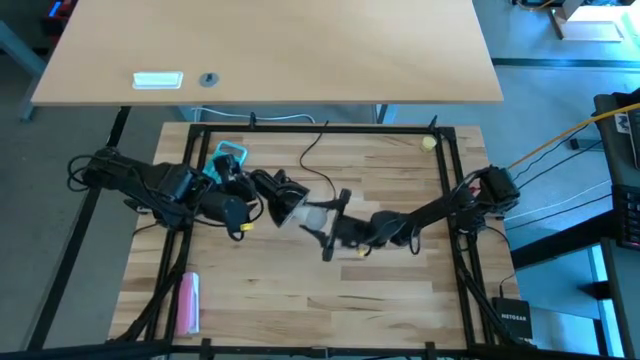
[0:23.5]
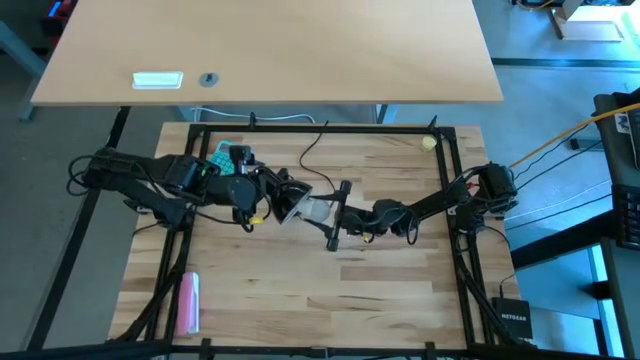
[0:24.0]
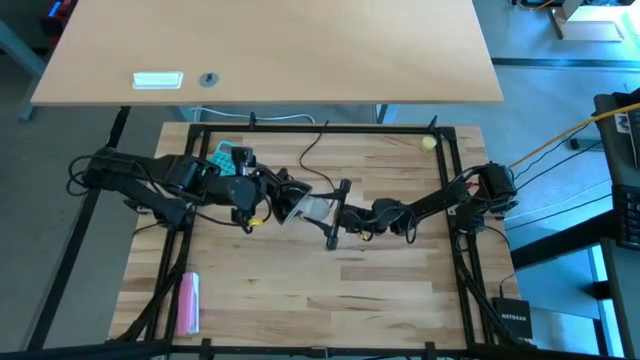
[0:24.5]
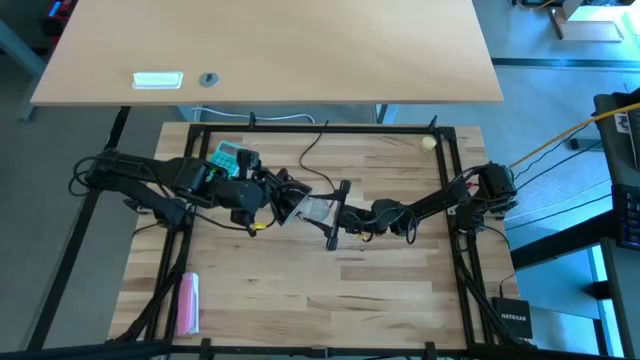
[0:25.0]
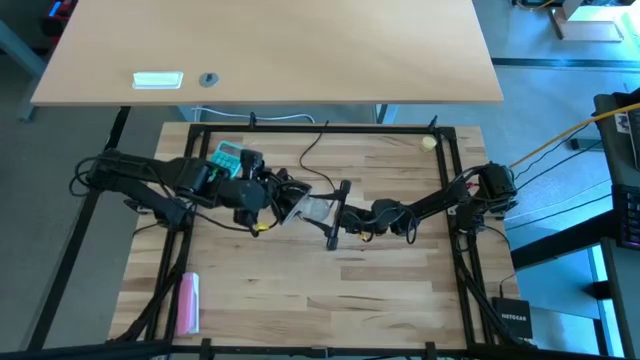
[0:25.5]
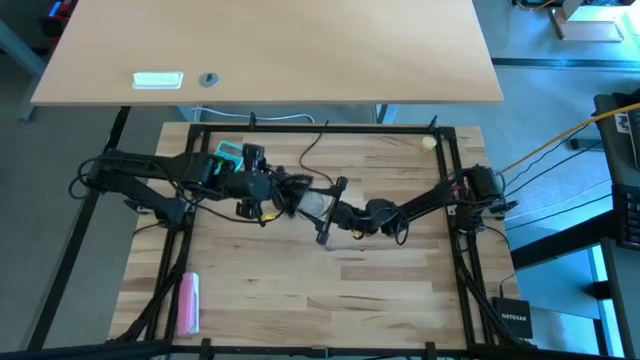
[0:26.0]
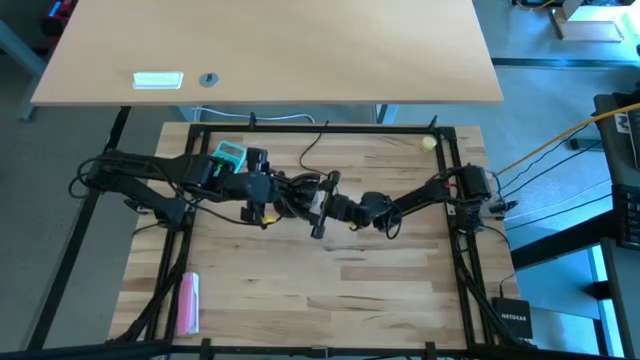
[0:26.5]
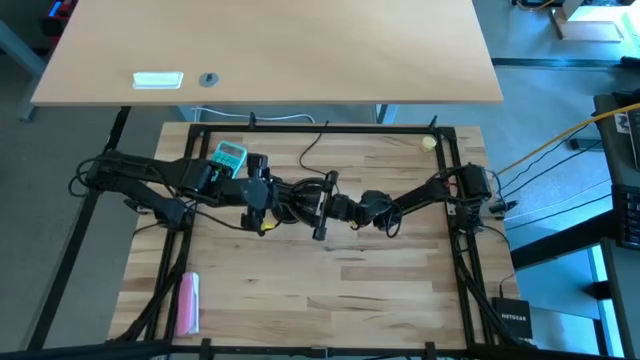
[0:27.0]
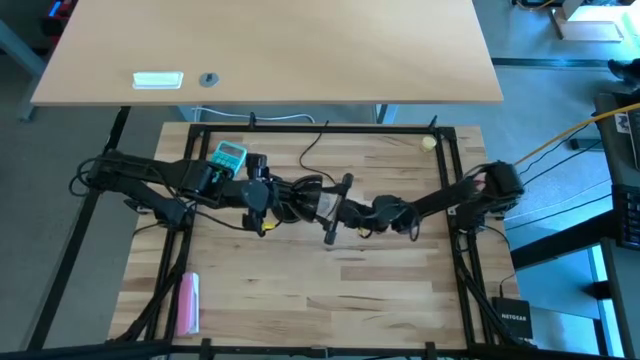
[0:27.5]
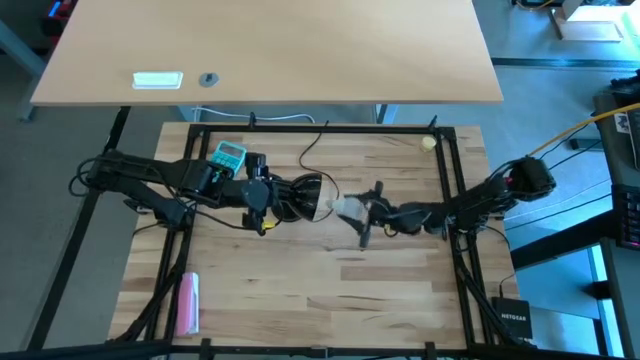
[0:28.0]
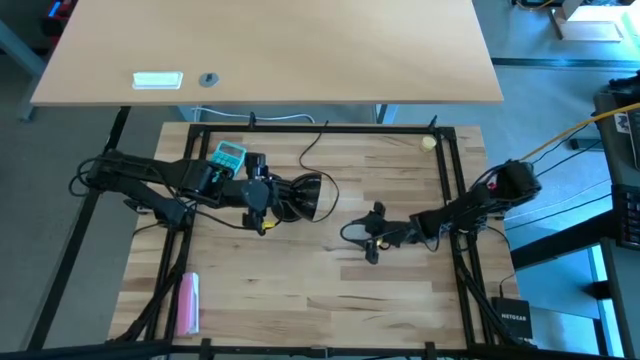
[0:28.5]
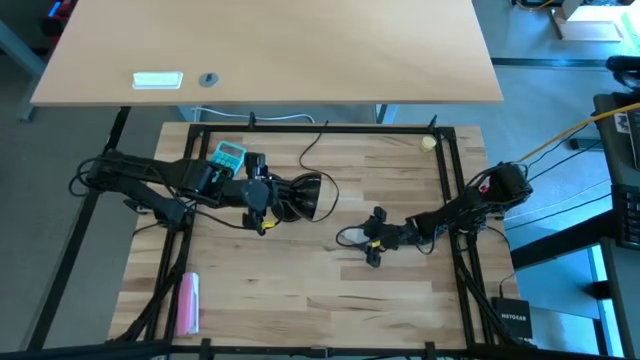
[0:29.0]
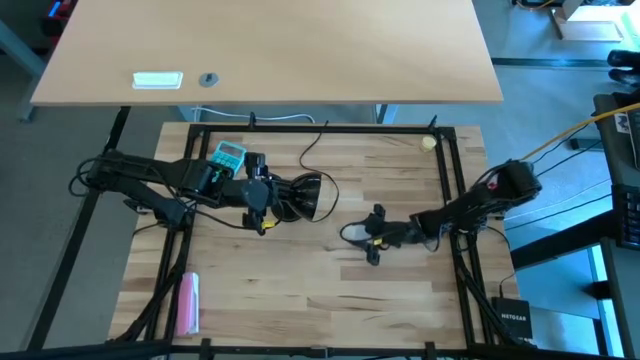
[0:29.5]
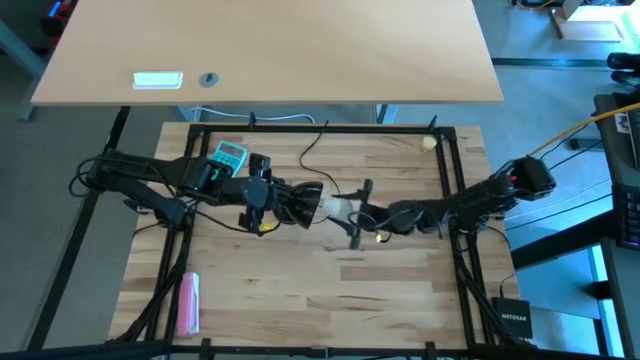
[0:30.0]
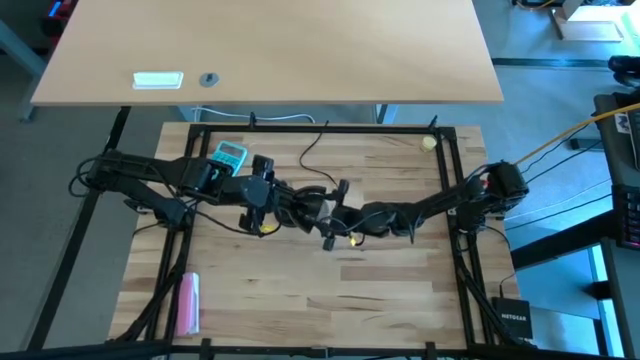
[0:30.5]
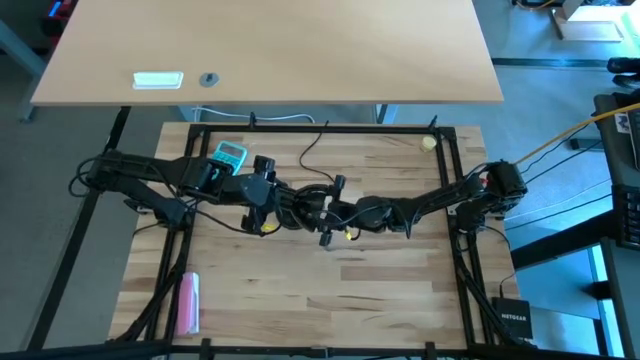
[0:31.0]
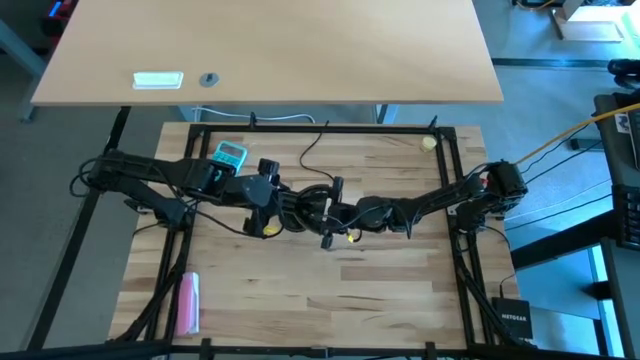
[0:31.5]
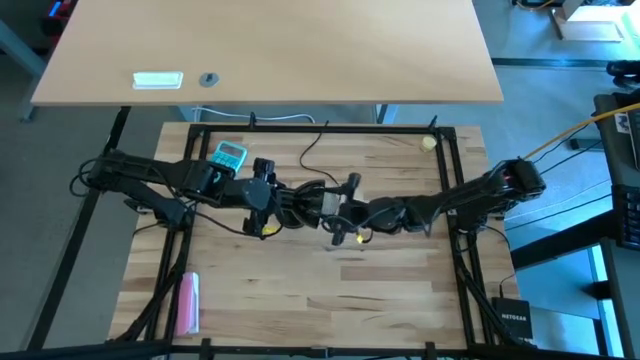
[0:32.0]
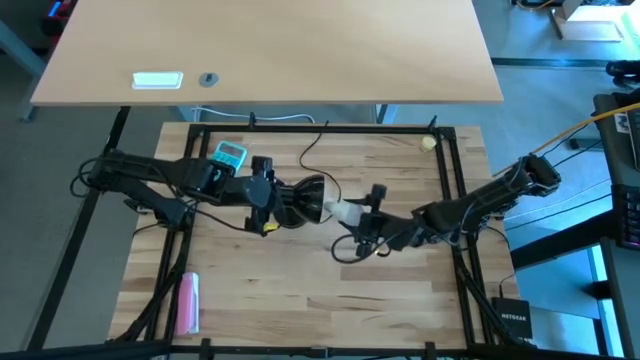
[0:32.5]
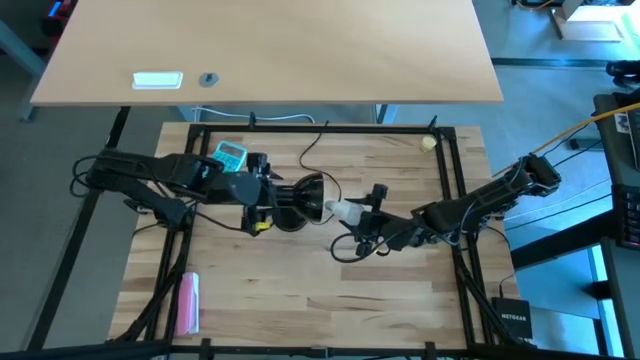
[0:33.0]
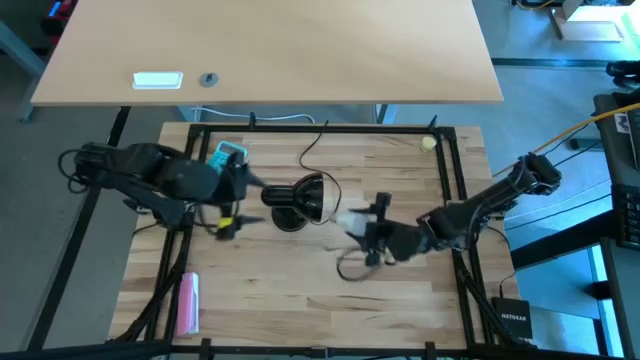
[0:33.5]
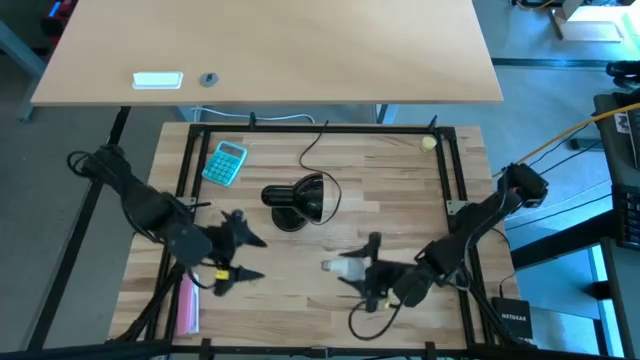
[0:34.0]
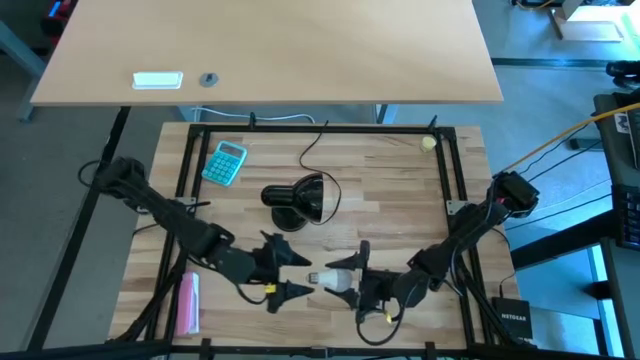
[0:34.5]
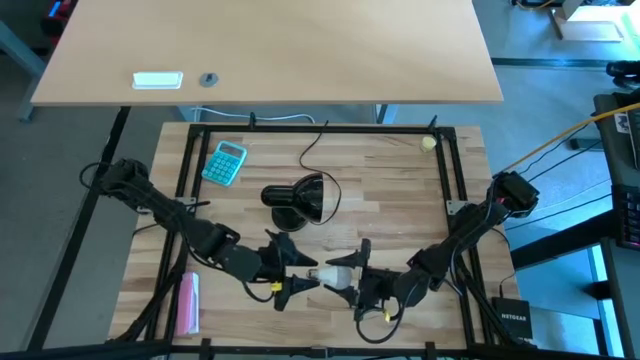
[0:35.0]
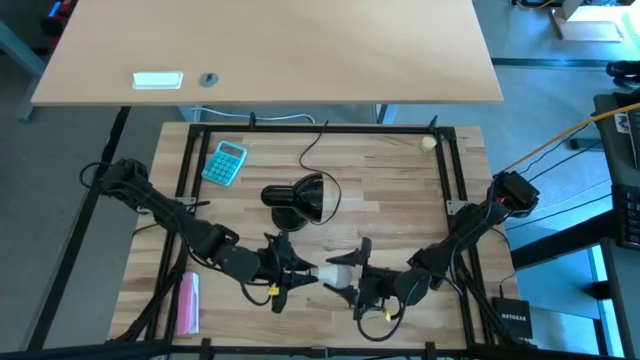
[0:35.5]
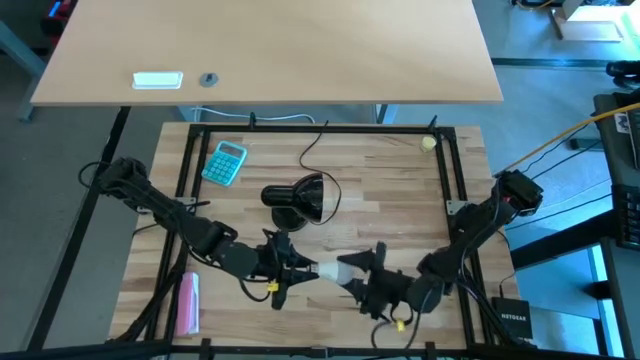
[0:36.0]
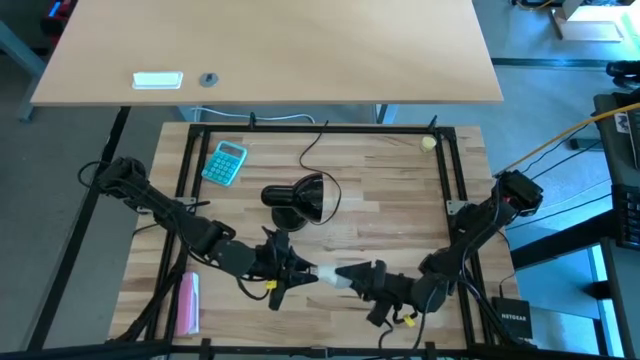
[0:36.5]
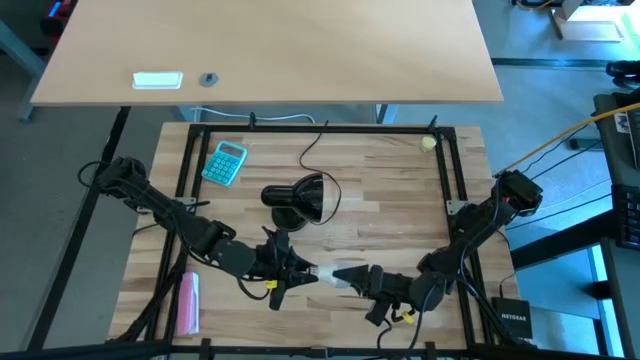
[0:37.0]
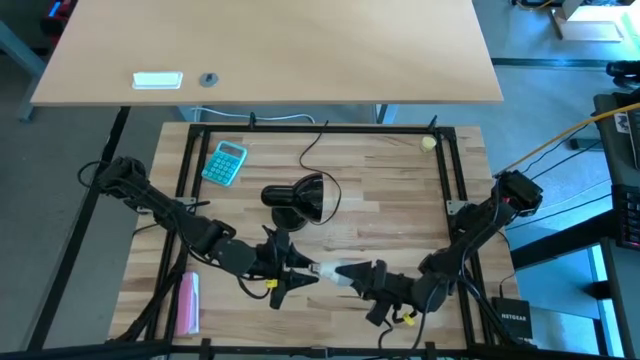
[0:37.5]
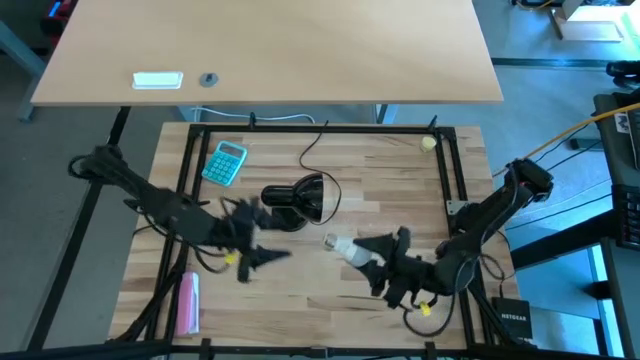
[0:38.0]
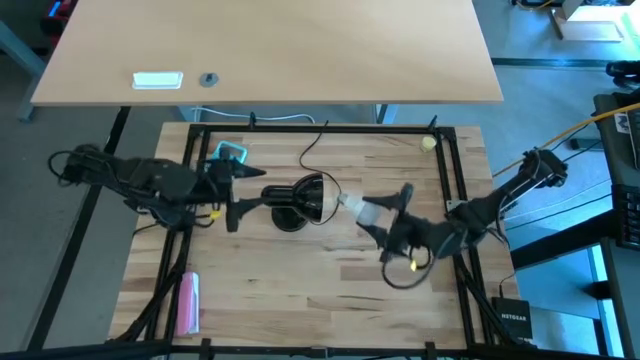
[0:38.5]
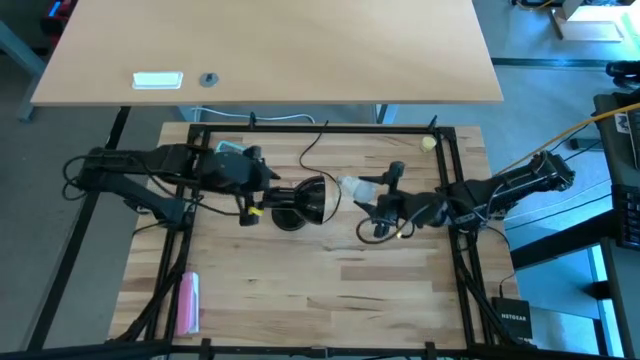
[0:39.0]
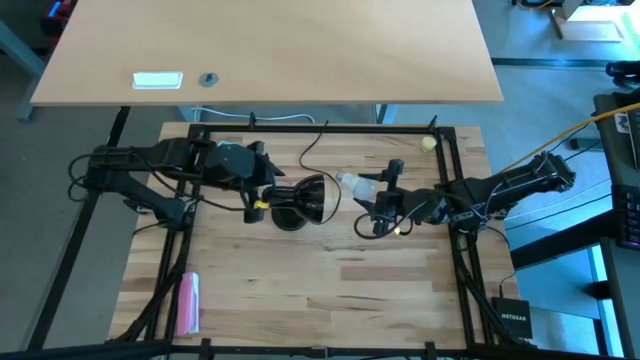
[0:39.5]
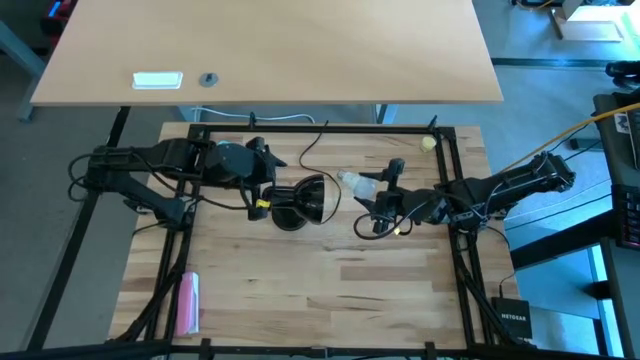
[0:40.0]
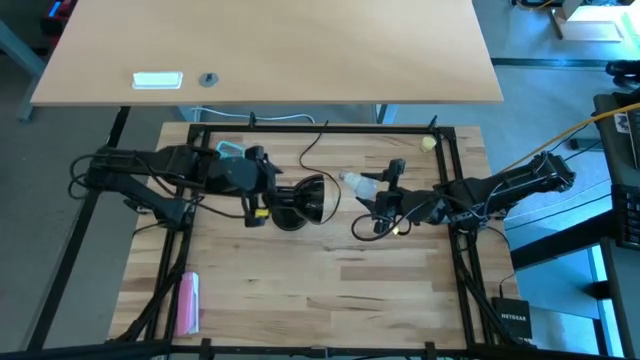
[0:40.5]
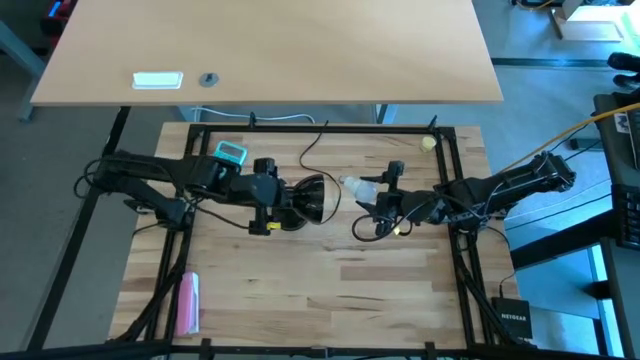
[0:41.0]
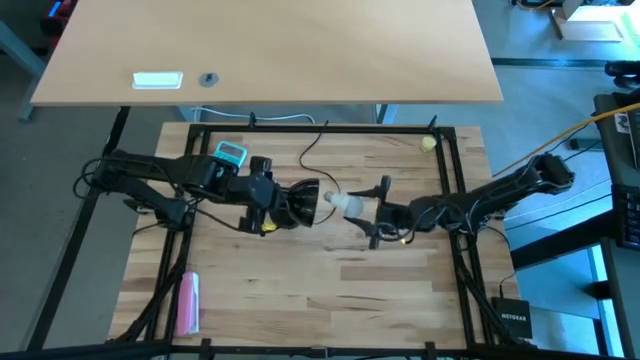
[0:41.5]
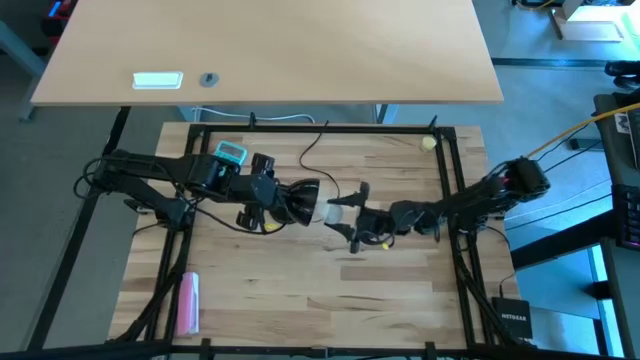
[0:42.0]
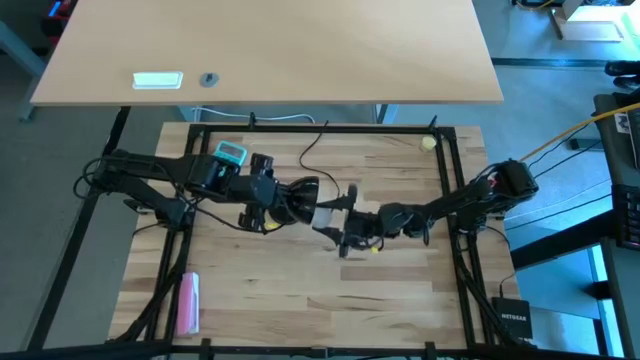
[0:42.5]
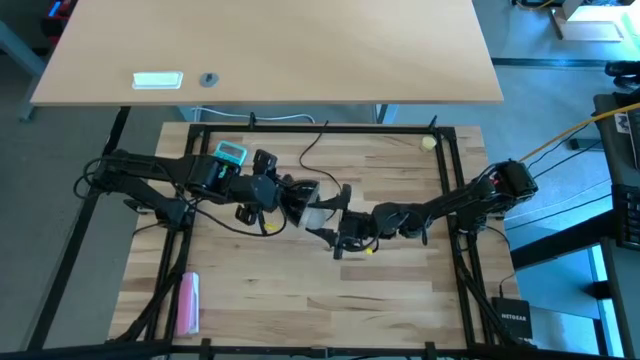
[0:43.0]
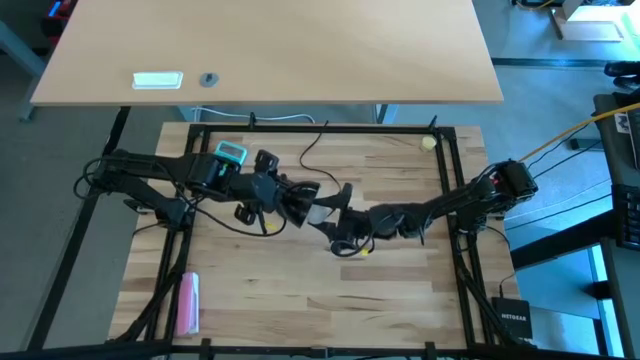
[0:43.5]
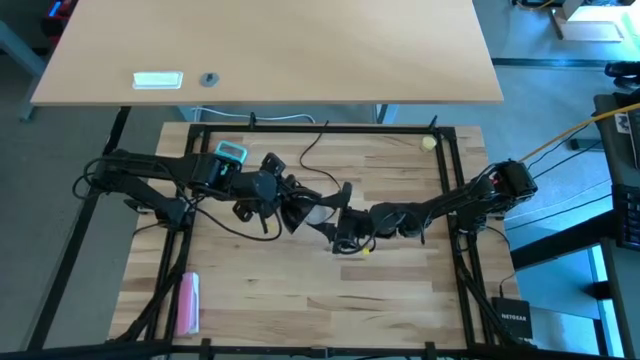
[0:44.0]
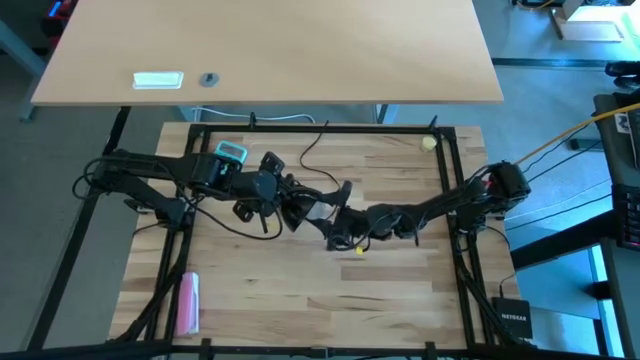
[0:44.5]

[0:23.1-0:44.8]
Task: Screw lightbulb
Insert the lightbulb into the black lamp
